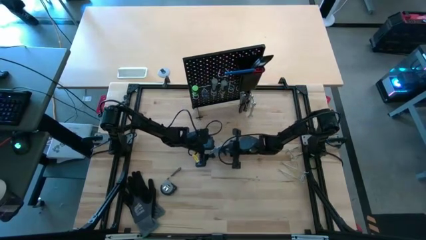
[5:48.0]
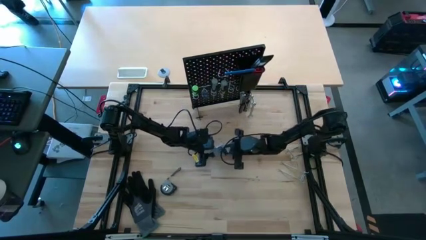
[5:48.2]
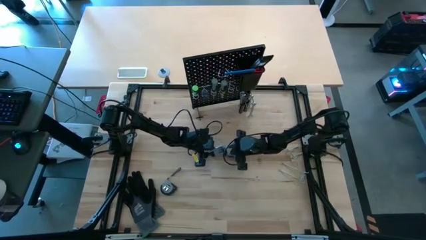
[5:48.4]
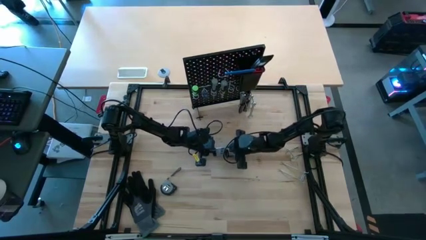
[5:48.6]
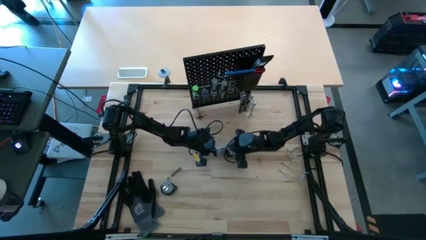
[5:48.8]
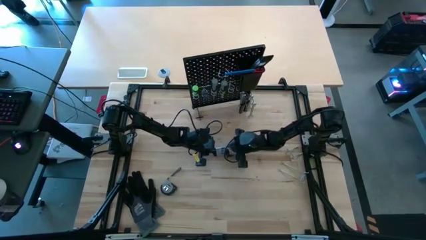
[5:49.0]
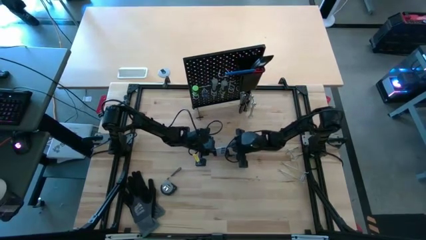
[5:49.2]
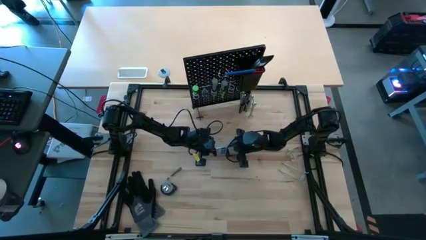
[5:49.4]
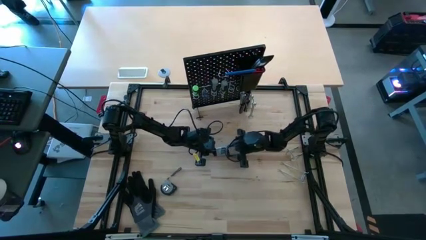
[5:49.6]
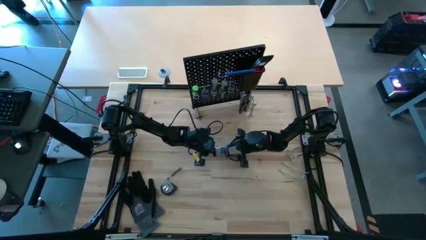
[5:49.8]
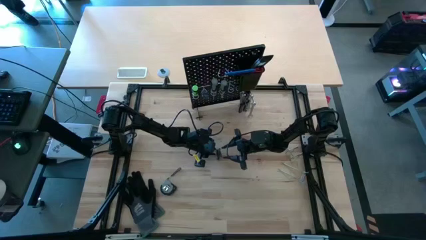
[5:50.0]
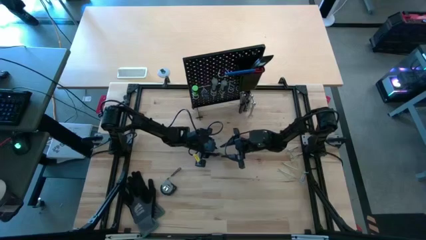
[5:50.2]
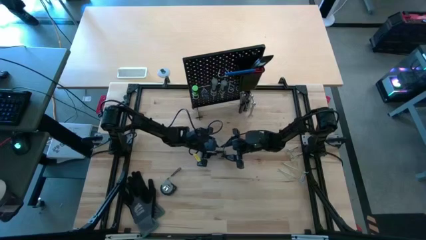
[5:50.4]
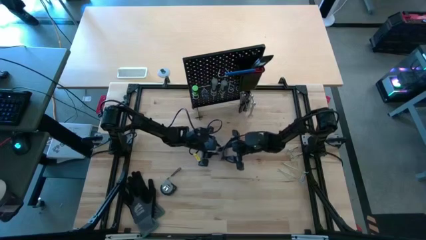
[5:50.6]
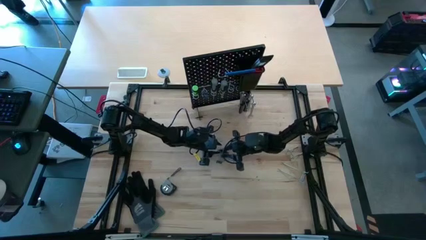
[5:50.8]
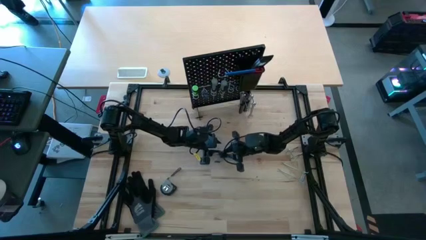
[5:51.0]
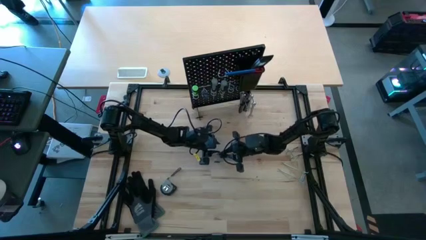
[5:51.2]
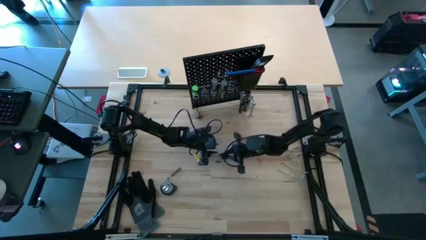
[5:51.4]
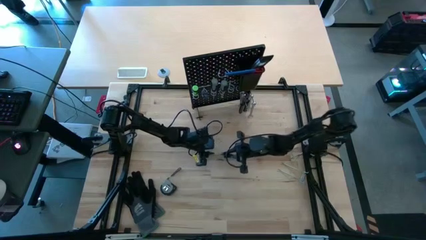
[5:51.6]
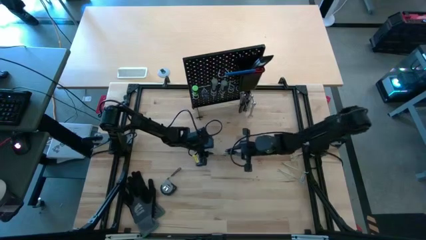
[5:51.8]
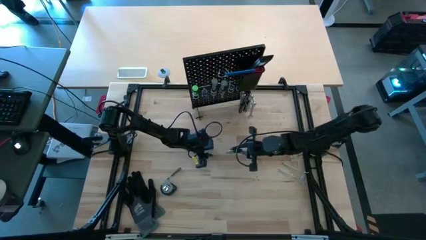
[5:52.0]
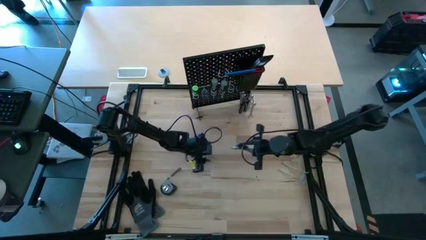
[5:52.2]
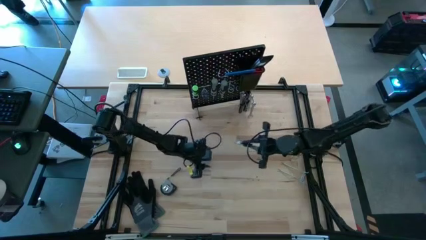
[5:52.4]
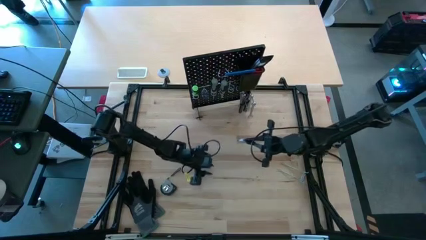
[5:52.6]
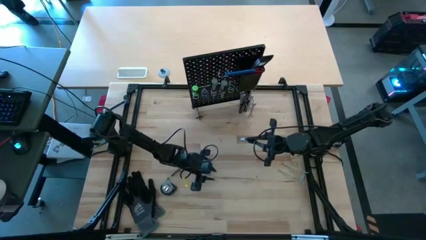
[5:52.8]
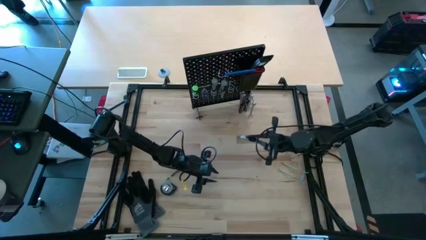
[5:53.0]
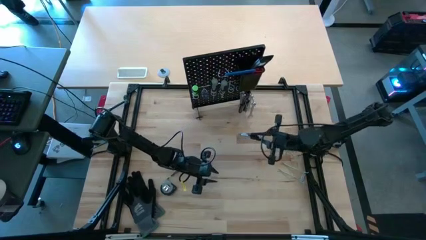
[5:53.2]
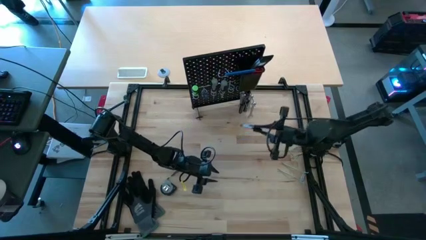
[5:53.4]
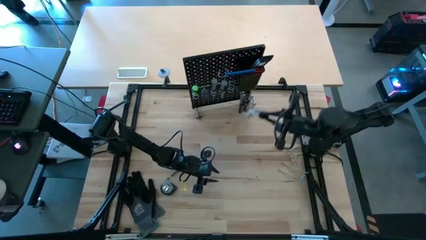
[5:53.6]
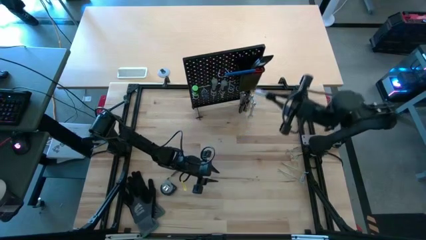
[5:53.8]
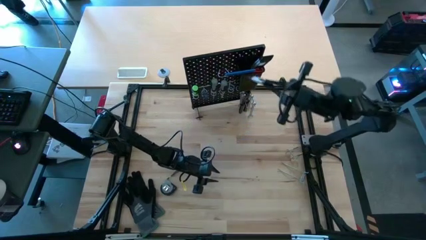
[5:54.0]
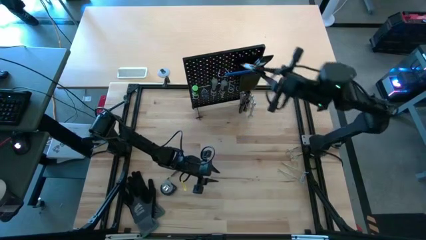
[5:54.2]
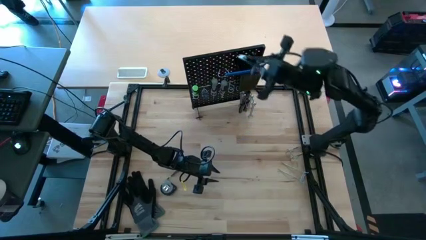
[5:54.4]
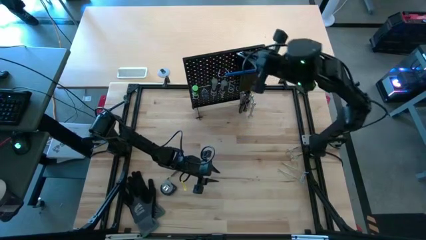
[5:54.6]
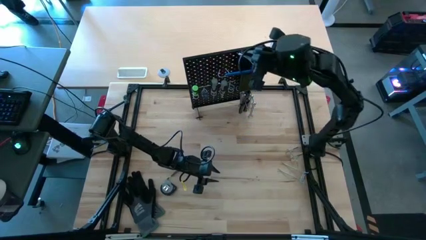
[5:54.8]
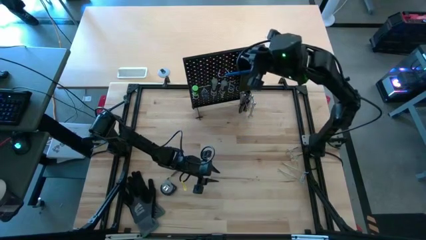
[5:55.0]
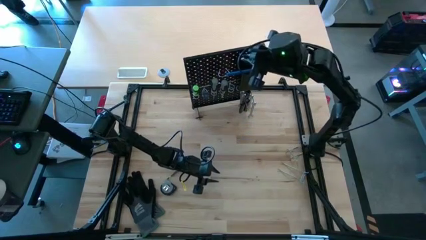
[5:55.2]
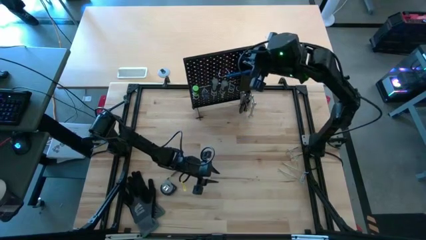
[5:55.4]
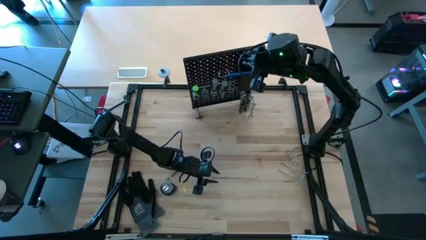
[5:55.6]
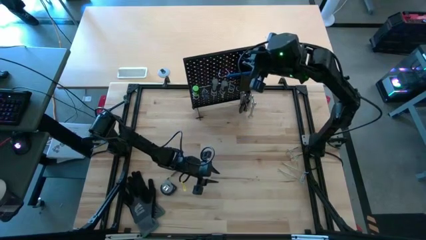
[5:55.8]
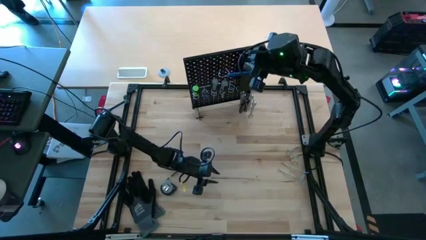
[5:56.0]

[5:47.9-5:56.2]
Task: Hang tools onto peg board
Put the allen wrenches into the pegboard bin

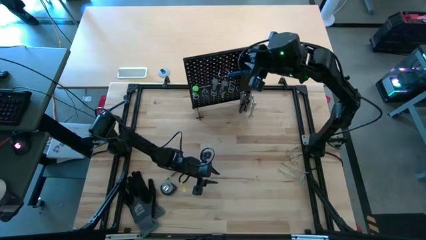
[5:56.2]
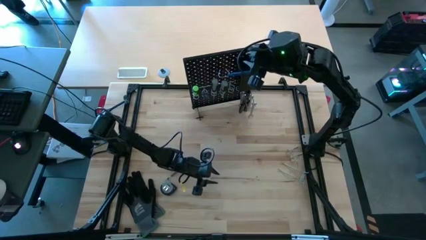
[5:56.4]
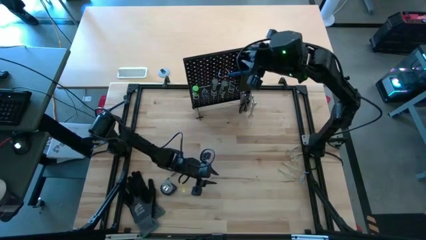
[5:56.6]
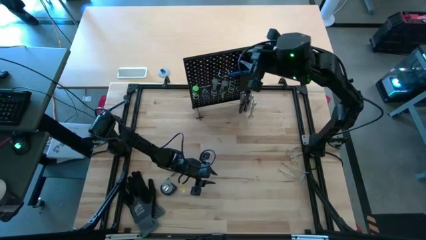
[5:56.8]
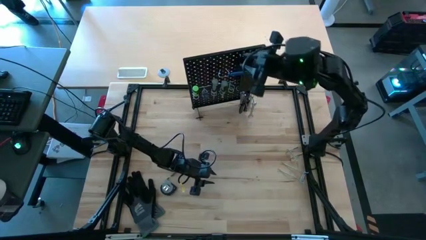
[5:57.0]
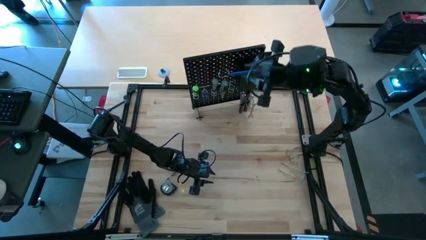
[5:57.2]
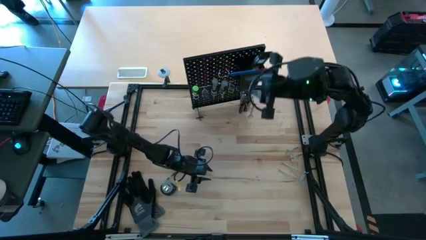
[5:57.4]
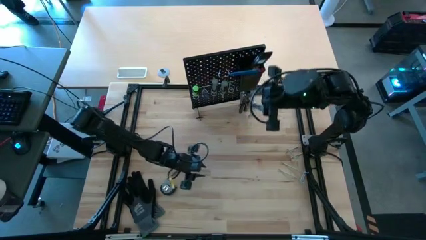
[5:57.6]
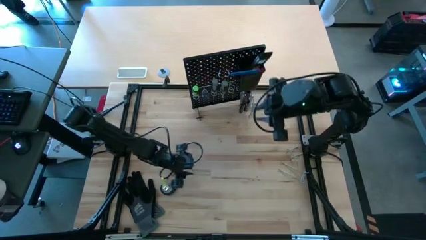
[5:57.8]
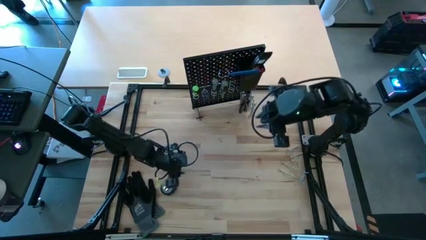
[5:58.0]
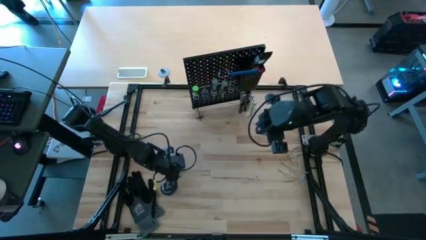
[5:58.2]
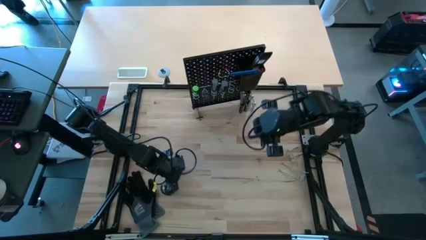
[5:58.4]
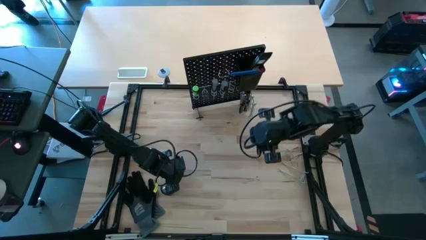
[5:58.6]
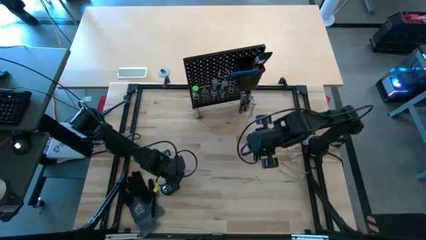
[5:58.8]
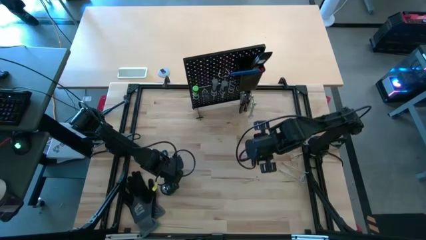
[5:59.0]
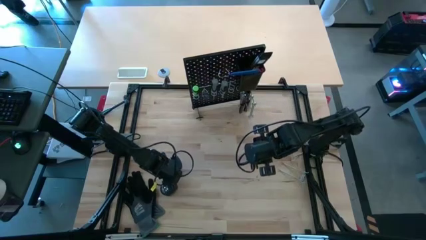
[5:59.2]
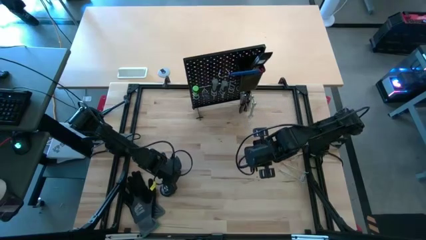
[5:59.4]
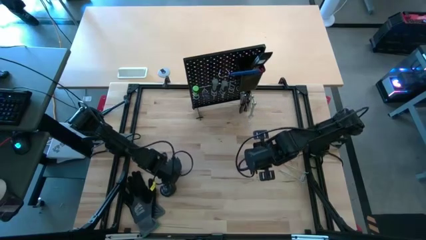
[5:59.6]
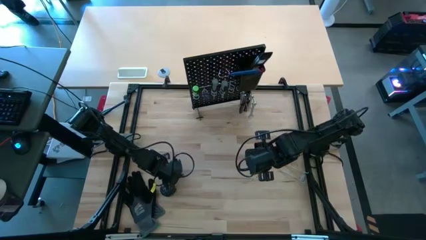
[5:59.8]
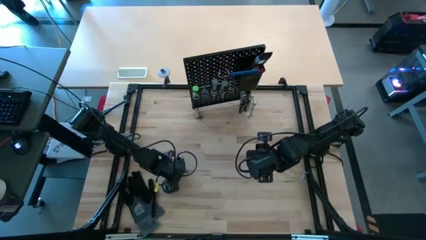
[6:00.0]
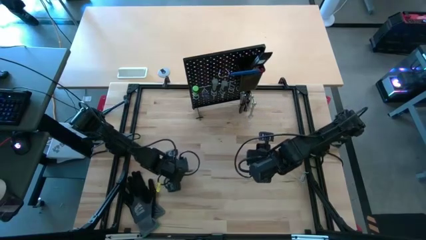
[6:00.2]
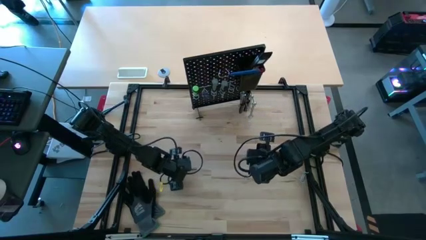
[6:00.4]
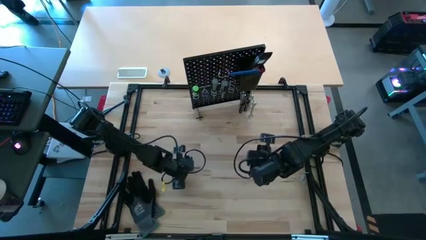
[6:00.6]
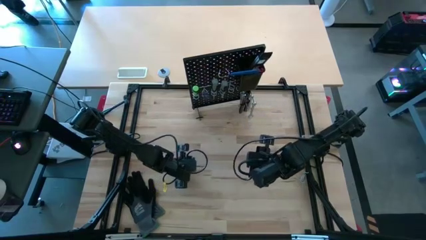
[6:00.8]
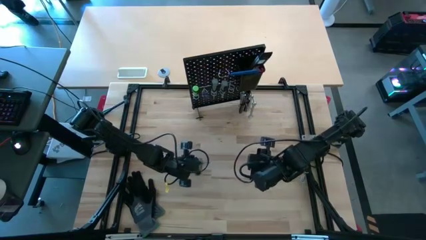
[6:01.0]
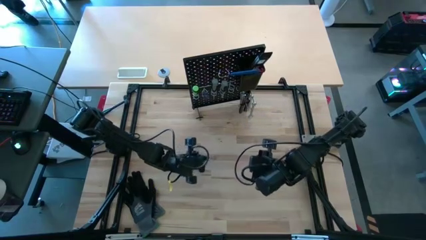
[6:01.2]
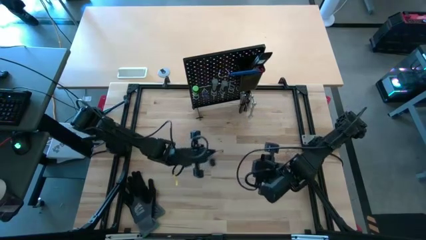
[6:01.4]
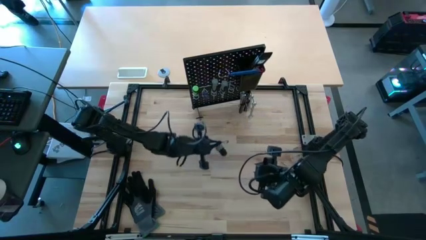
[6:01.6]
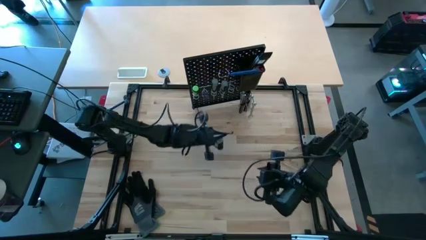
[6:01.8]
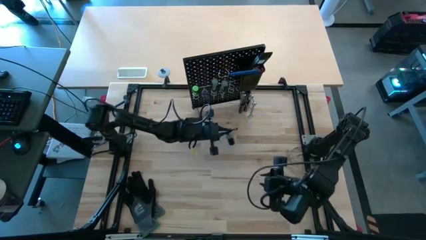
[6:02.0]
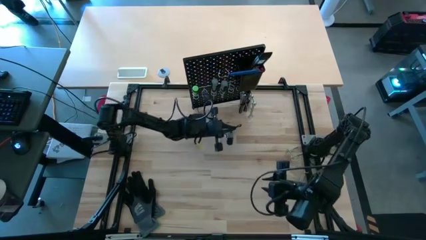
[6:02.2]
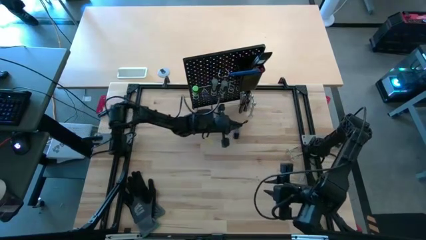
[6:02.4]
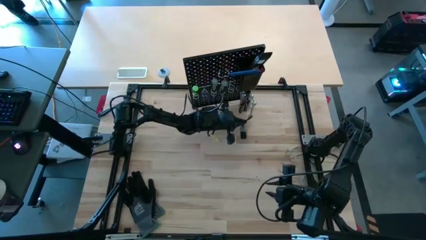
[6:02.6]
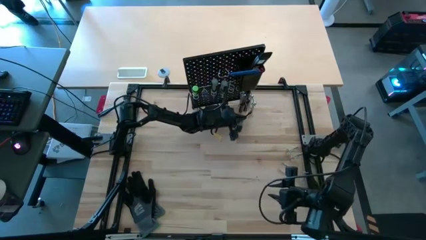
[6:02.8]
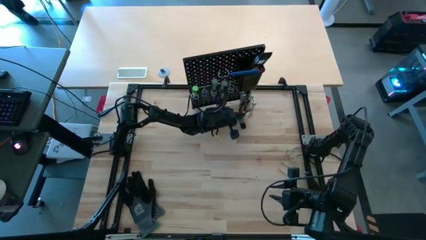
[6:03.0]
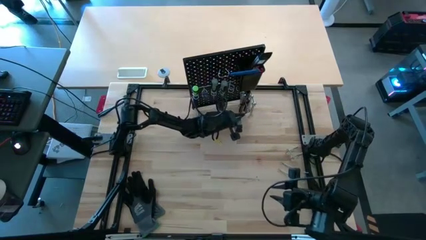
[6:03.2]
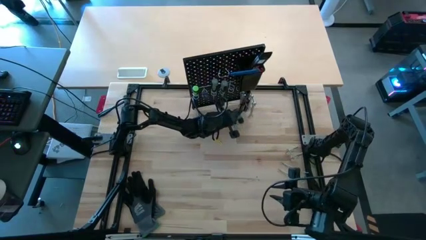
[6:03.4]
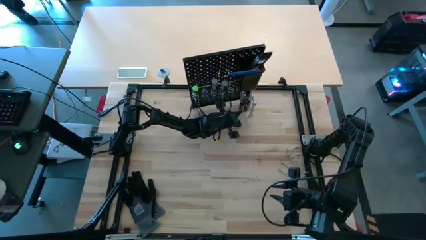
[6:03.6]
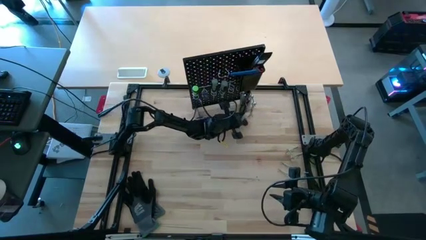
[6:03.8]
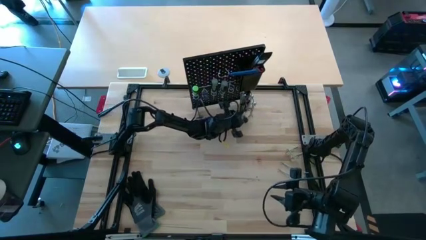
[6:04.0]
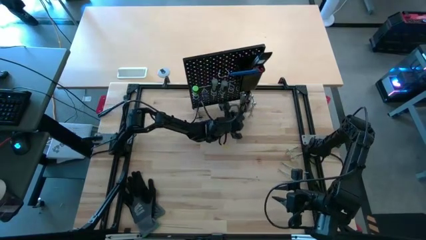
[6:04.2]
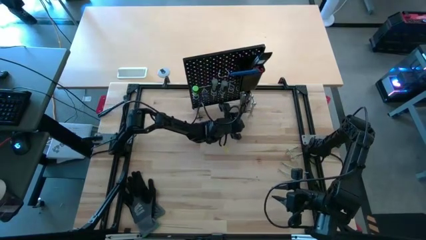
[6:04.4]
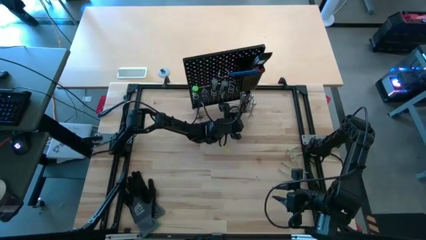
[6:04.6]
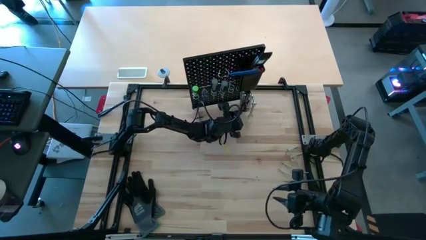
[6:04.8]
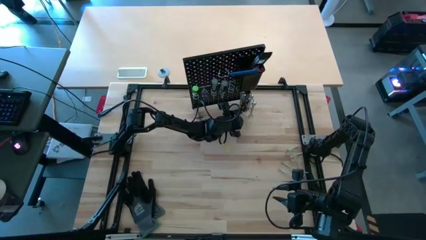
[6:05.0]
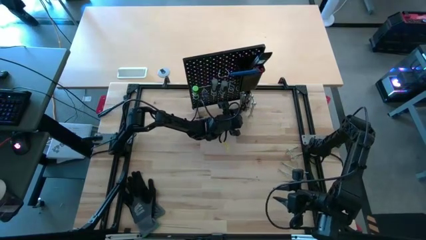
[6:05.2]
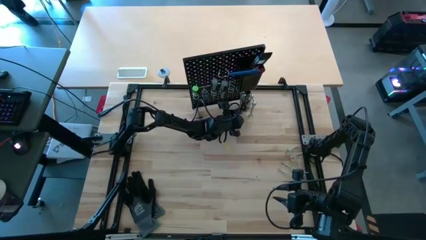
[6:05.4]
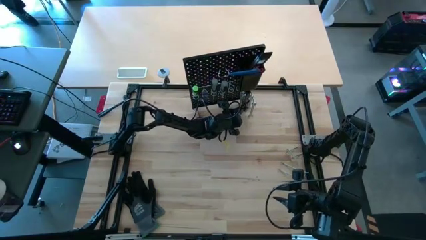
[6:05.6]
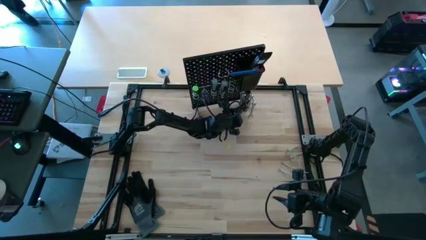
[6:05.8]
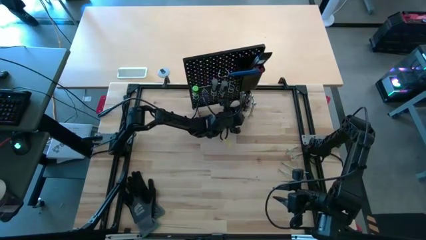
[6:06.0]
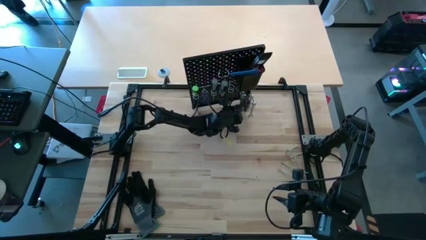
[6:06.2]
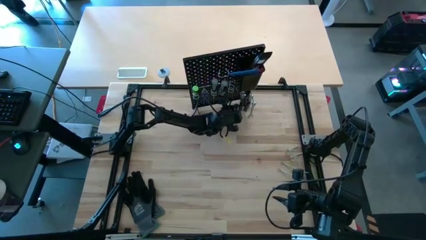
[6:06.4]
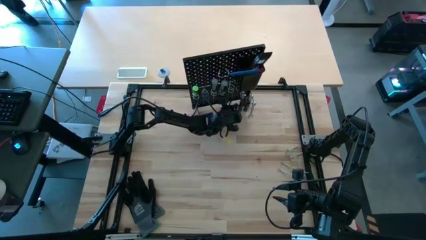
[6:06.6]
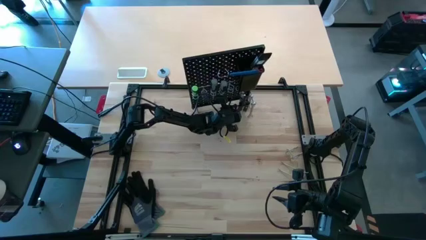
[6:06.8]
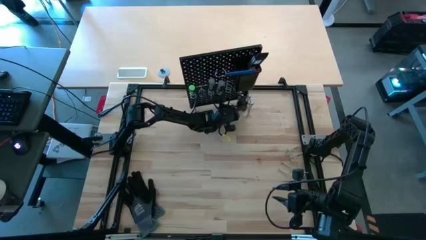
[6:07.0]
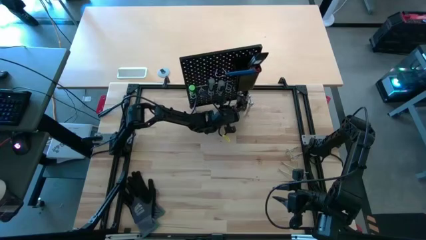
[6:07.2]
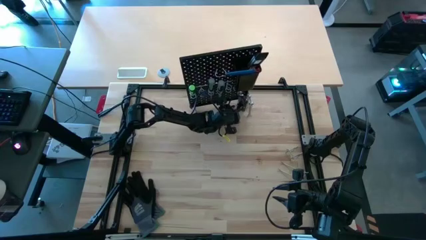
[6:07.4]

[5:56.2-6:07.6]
Hang the gray measuring tape onto the pegboard
